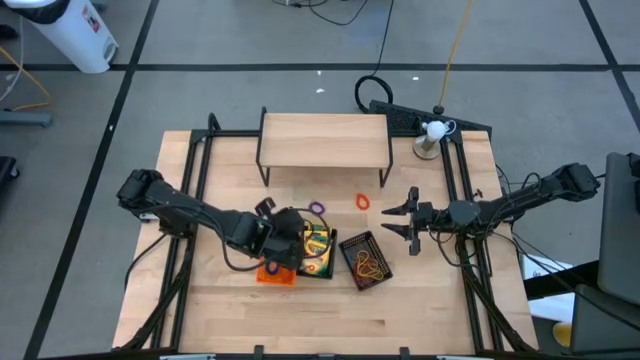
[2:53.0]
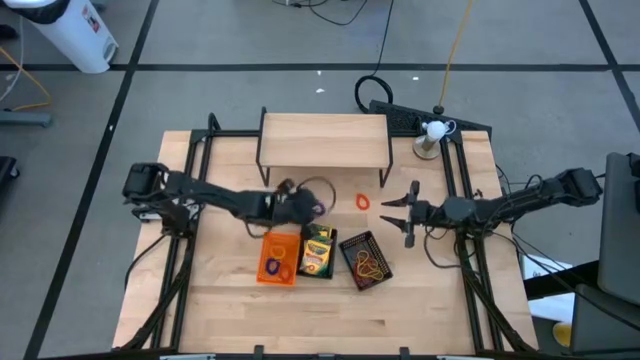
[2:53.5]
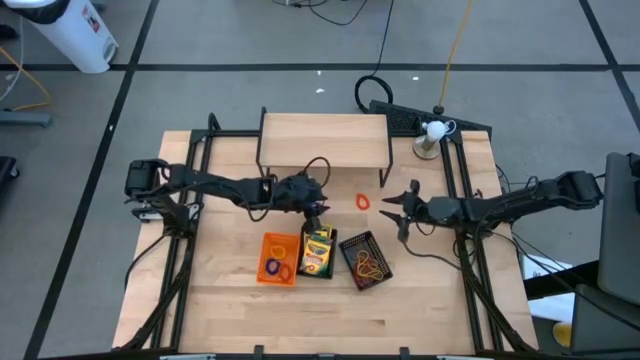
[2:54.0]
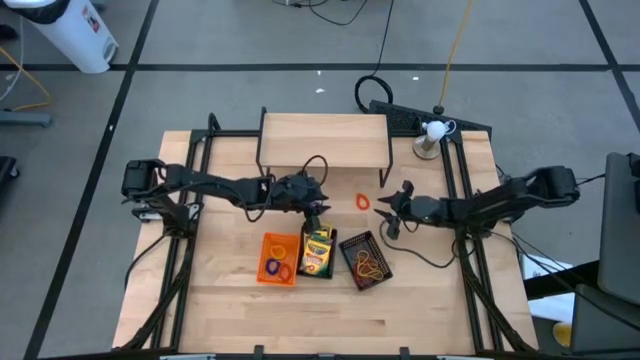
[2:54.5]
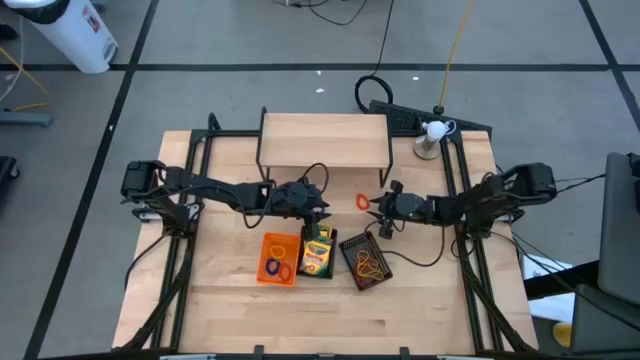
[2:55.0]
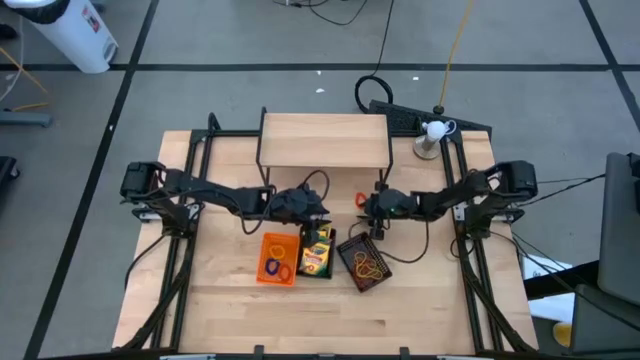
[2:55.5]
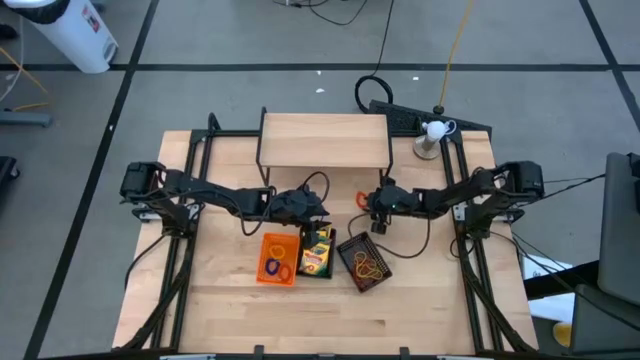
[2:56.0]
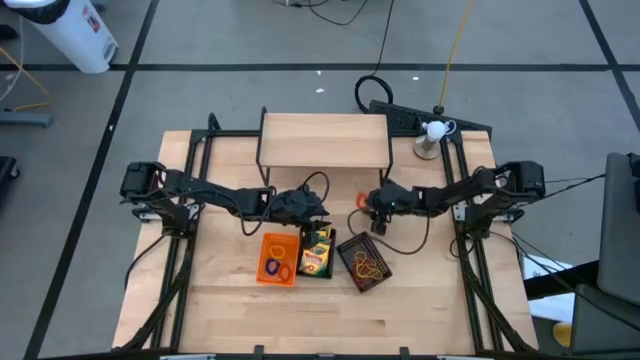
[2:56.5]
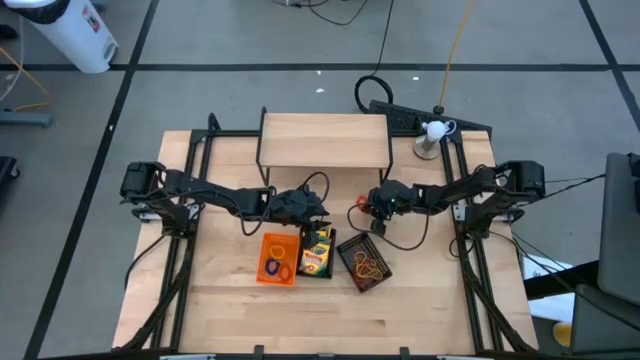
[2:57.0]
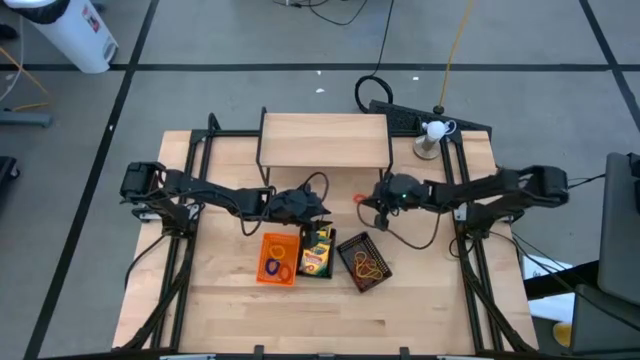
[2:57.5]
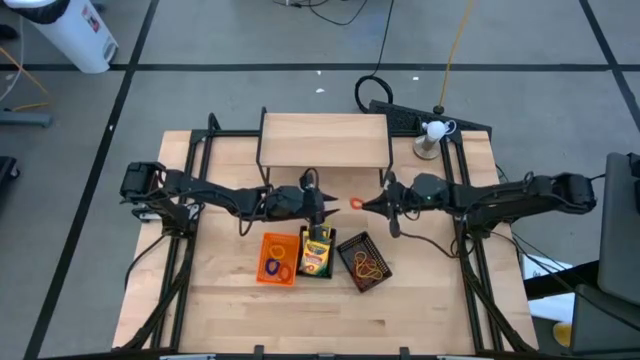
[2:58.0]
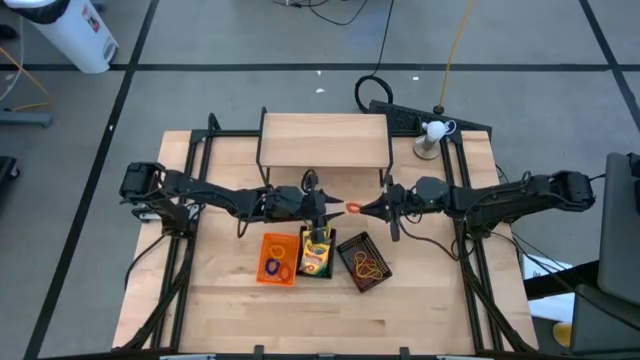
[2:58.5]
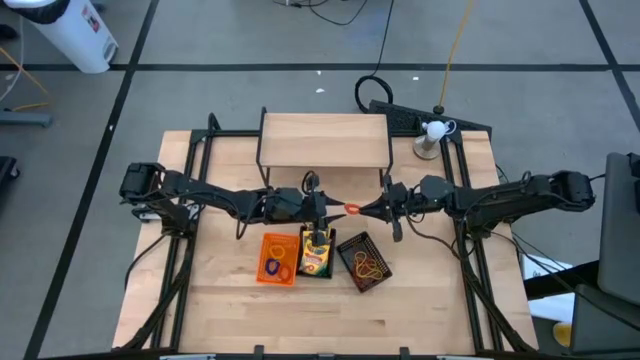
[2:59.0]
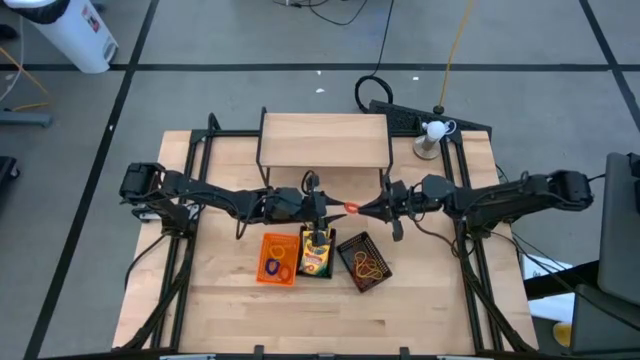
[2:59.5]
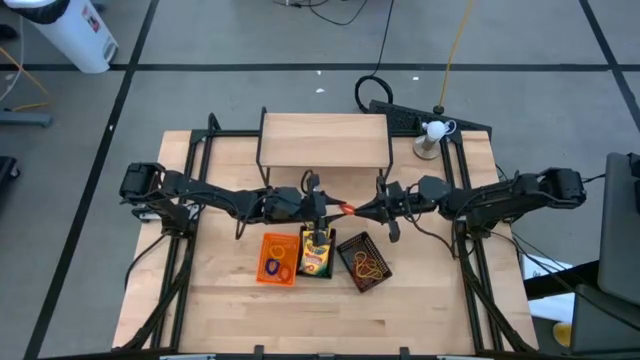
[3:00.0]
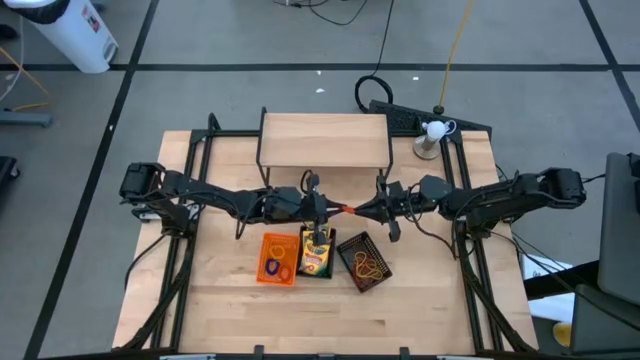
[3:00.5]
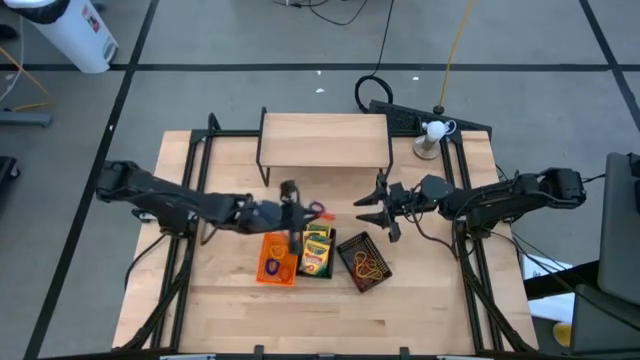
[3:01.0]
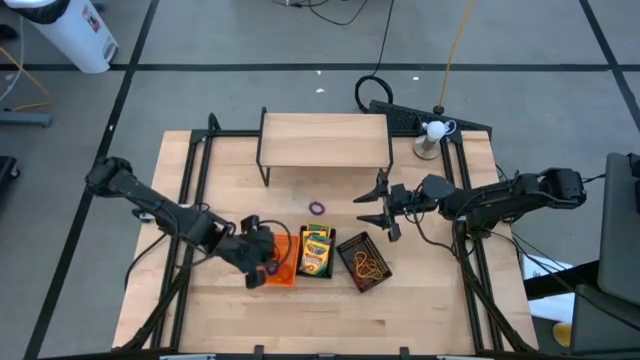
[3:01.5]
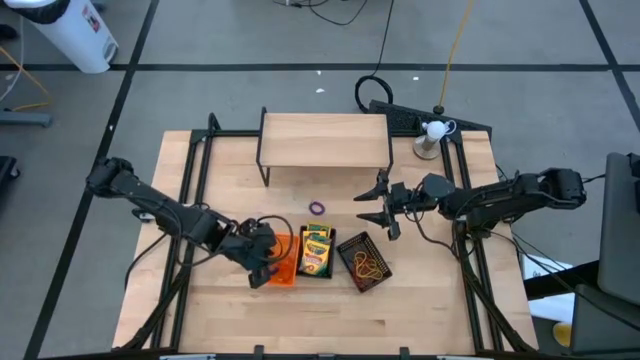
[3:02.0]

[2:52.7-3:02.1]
Task: Pick & Place Office Desk Supplies
Put the orange keychain into the orange bin

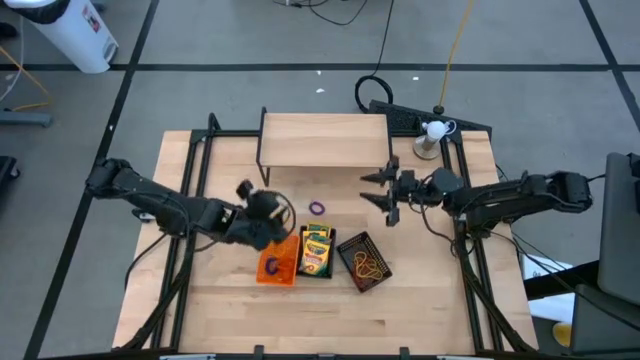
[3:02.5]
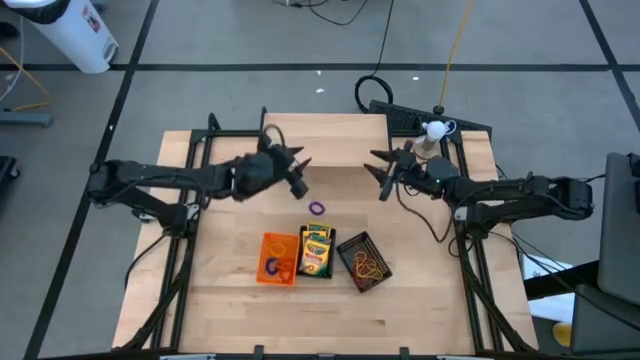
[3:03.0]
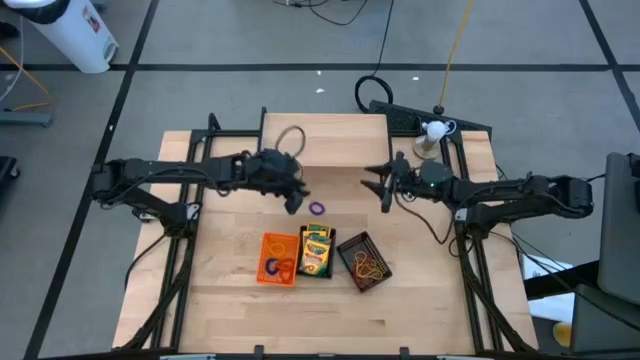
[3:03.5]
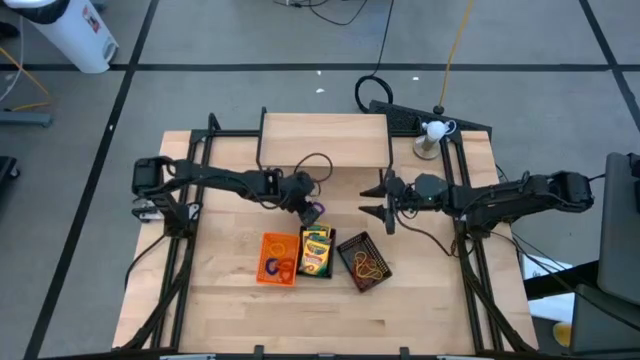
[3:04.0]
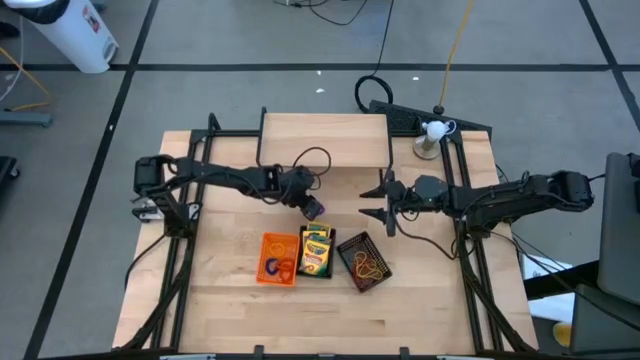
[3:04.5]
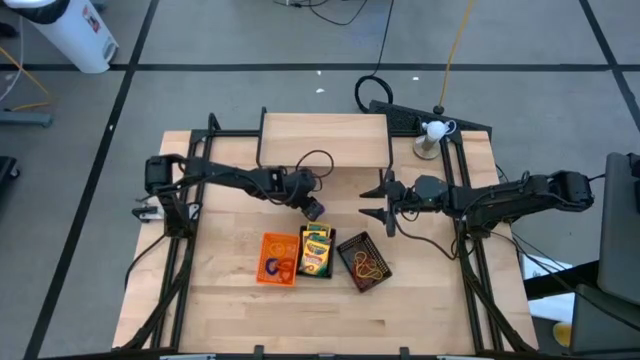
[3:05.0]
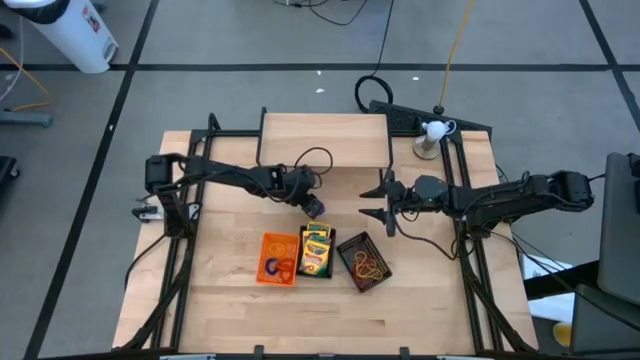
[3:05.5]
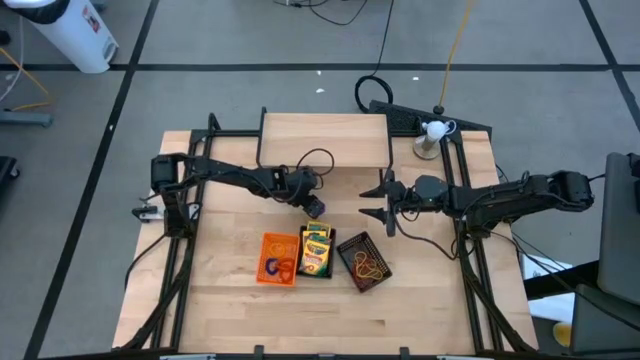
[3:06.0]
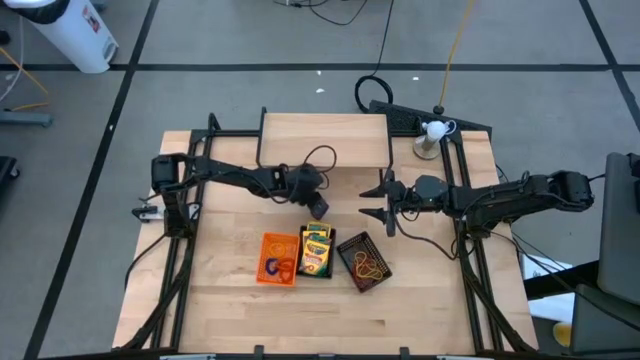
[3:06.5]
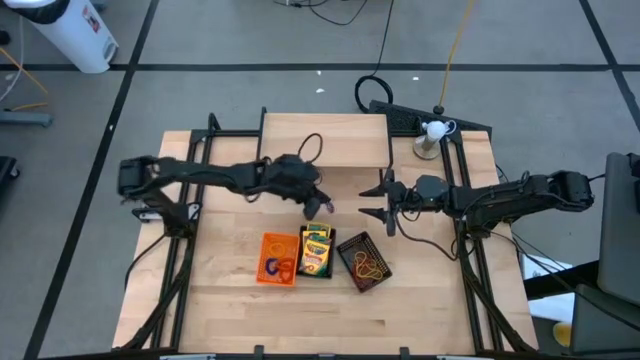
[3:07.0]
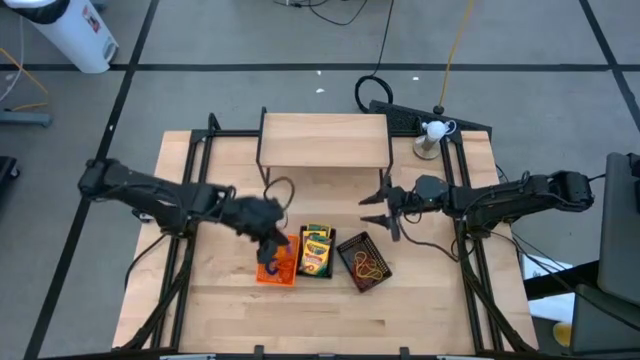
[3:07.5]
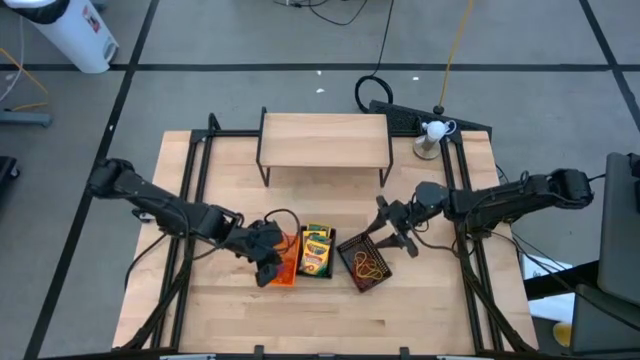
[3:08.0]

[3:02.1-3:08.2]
Put the violet keychain into the orange bin

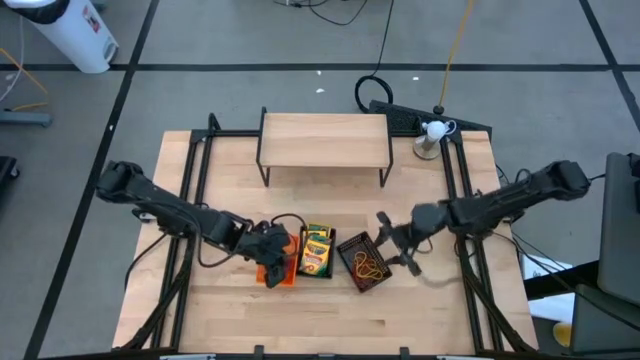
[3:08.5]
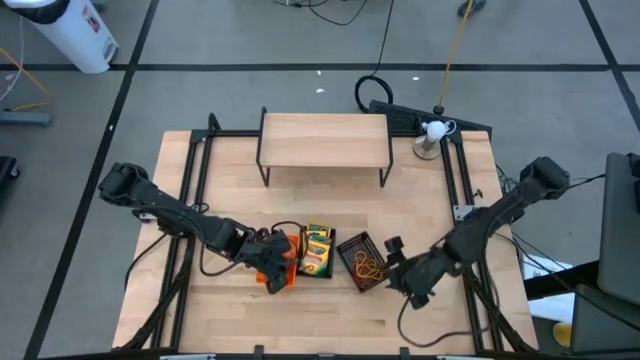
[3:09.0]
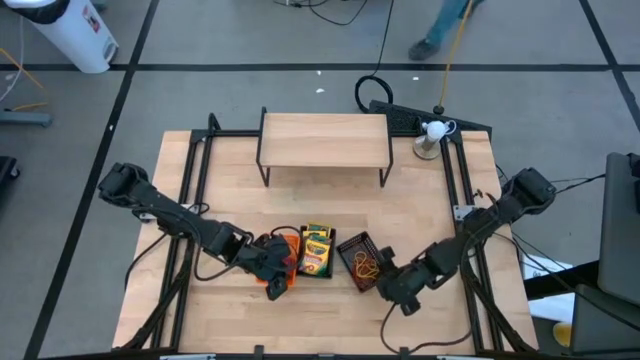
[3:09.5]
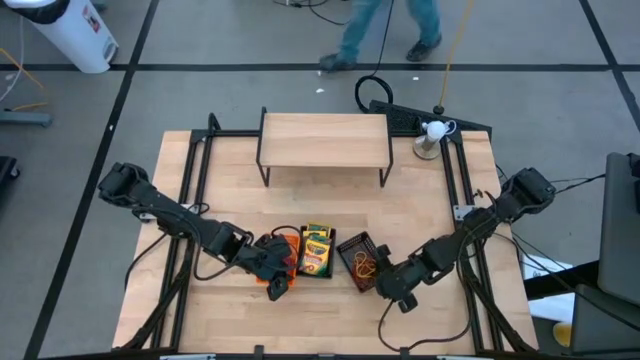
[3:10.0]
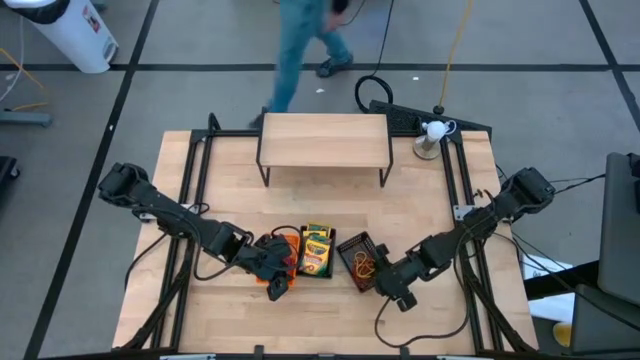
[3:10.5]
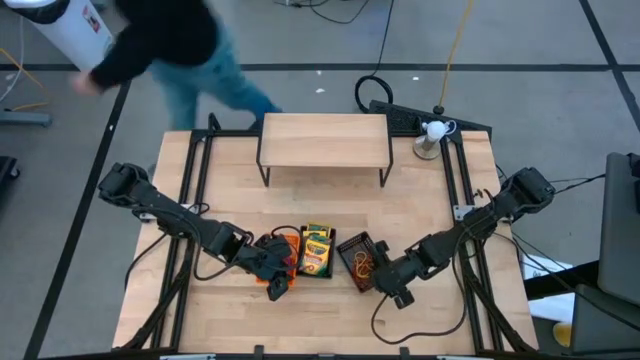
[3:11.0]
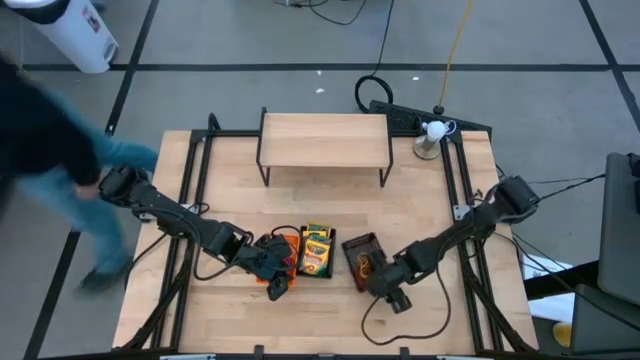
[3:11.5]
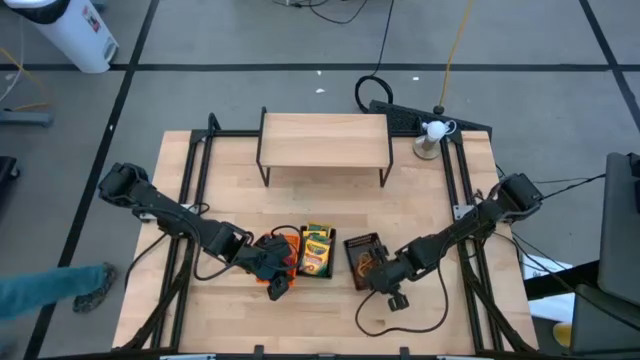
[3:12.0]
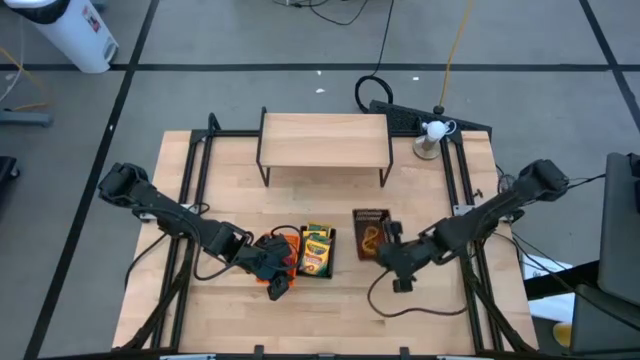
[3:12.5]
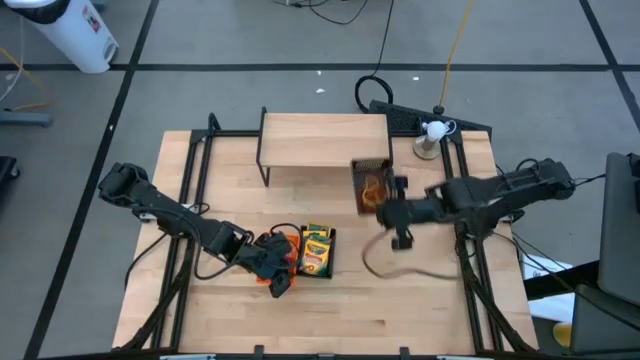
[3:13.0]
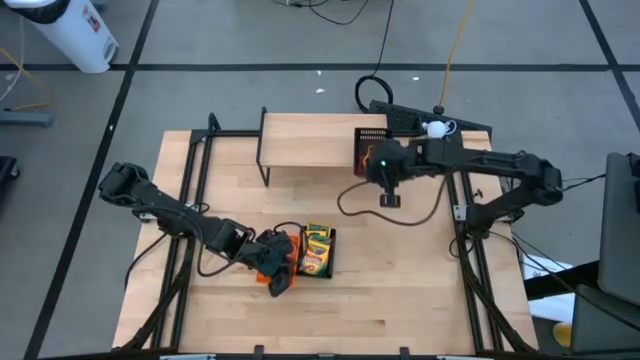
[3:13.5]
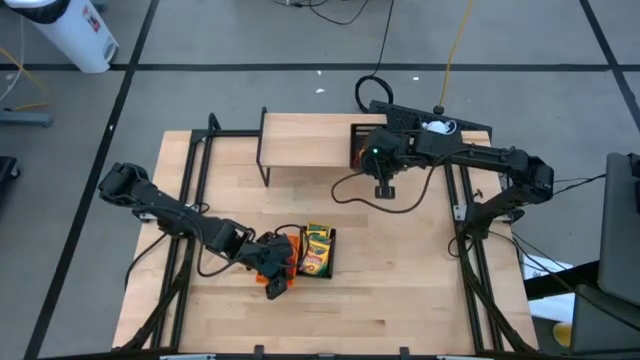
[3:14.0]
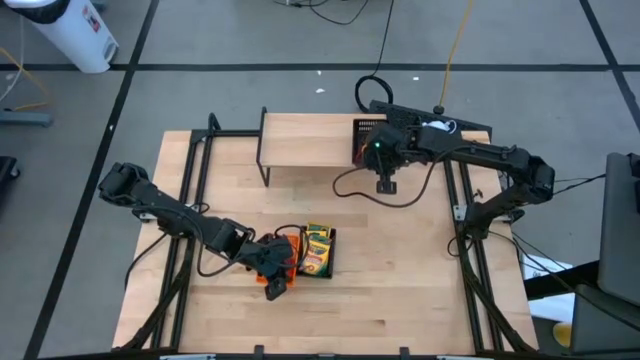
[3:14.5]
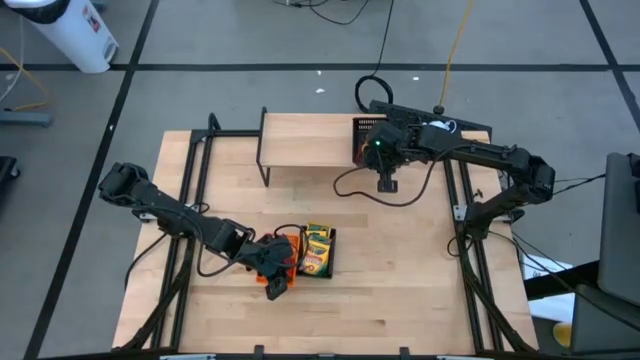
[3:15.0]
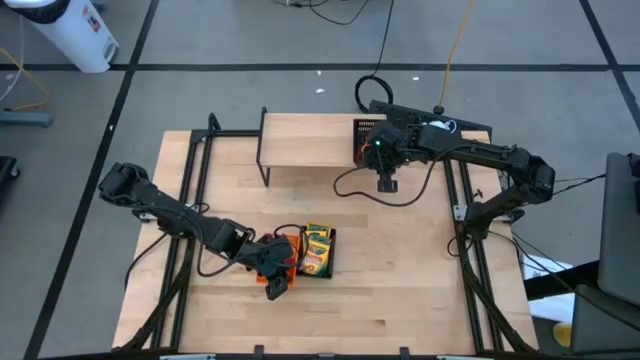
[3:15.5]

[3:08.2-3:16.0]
Put the right black bin on the shelf
